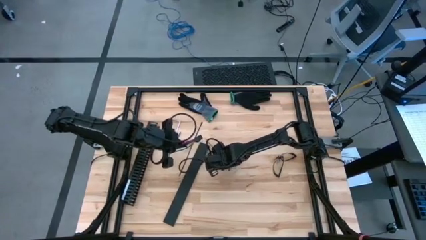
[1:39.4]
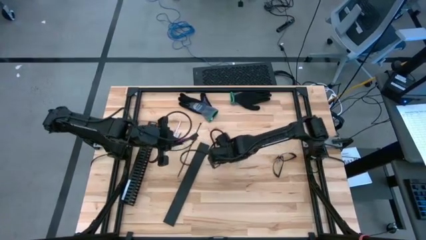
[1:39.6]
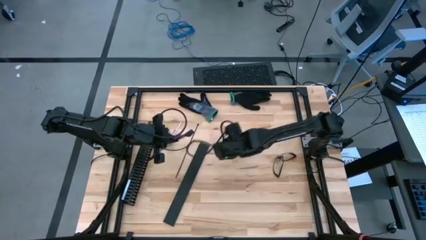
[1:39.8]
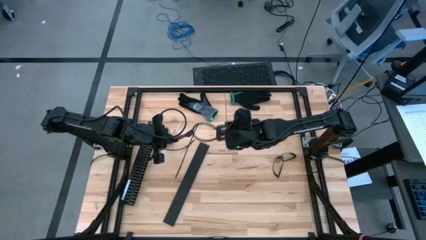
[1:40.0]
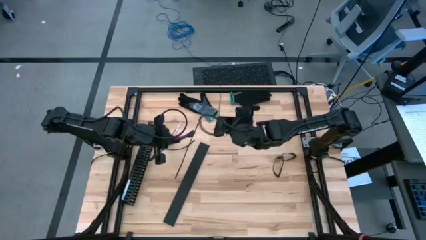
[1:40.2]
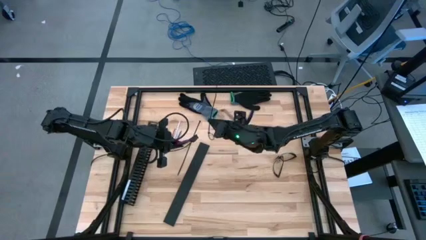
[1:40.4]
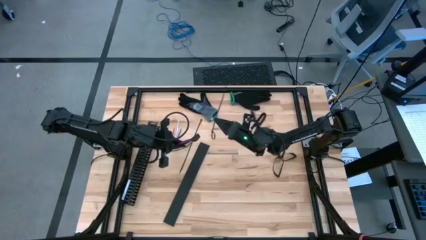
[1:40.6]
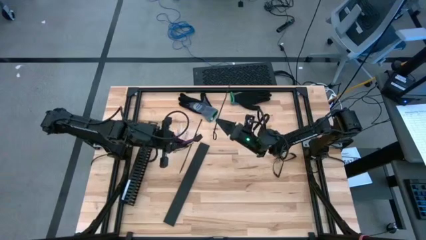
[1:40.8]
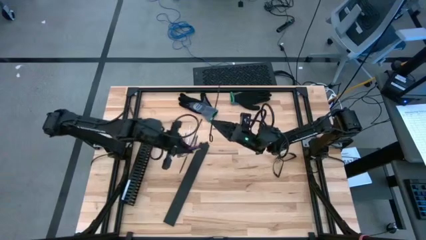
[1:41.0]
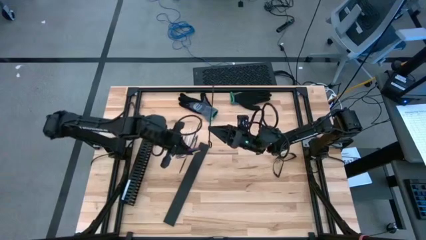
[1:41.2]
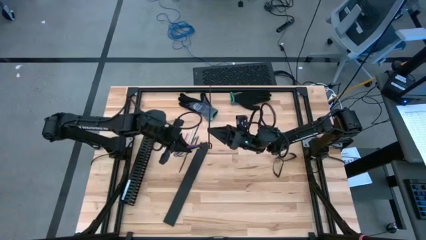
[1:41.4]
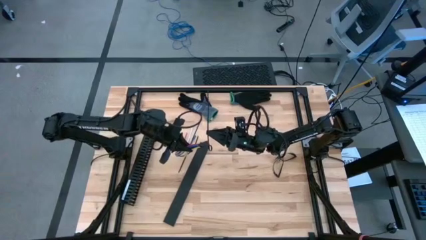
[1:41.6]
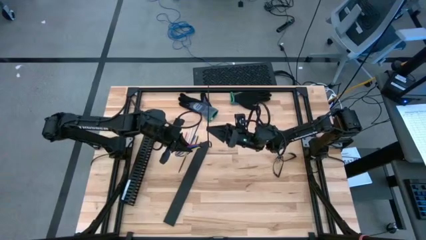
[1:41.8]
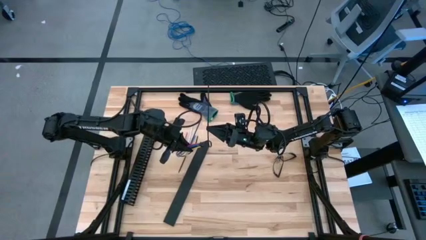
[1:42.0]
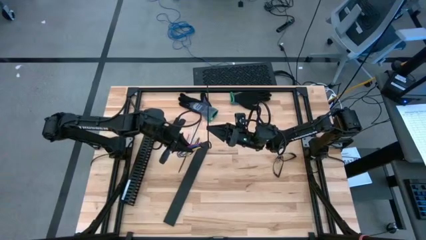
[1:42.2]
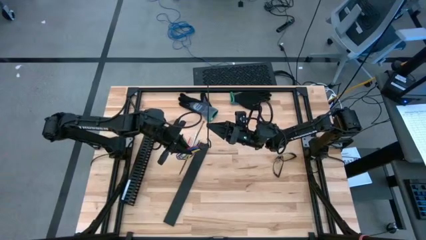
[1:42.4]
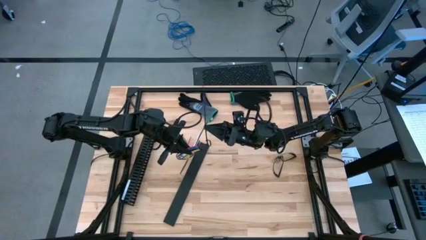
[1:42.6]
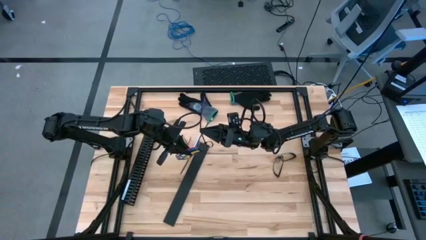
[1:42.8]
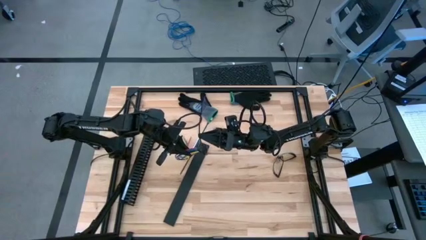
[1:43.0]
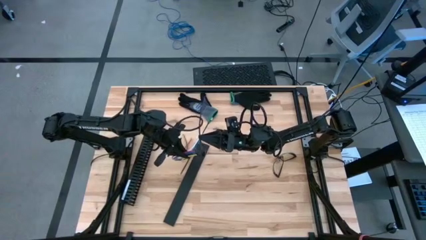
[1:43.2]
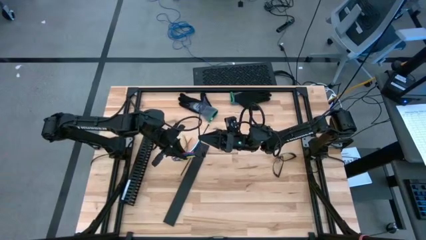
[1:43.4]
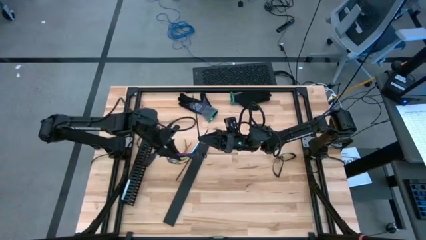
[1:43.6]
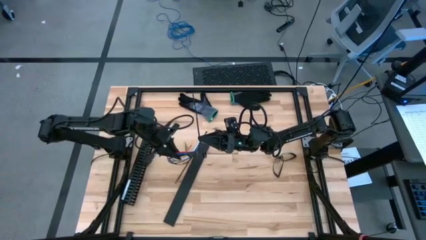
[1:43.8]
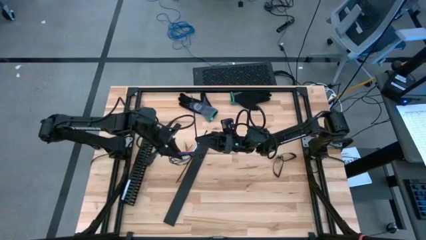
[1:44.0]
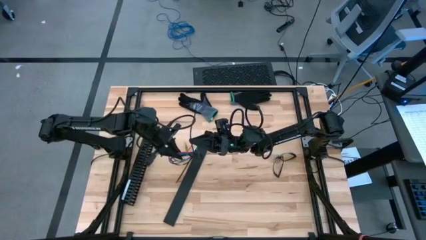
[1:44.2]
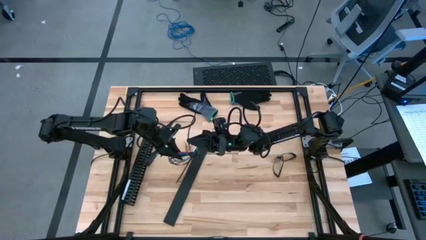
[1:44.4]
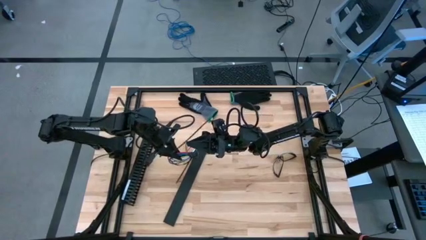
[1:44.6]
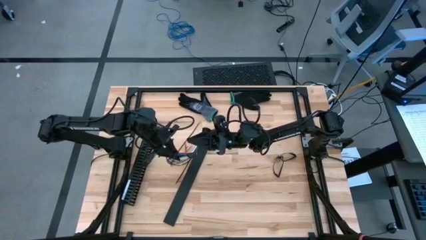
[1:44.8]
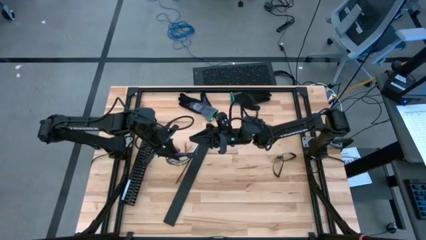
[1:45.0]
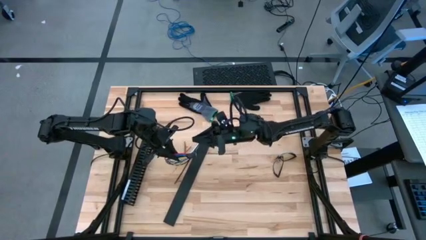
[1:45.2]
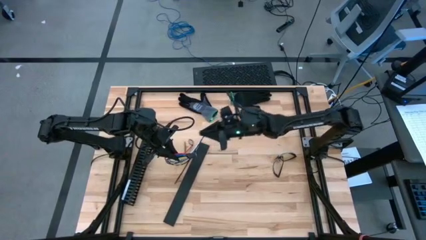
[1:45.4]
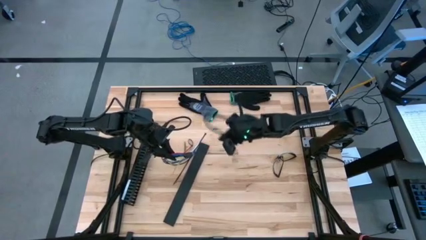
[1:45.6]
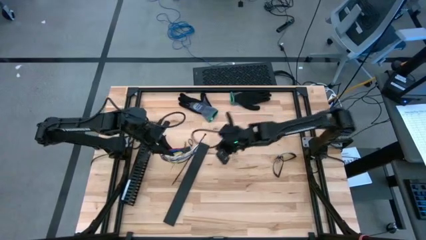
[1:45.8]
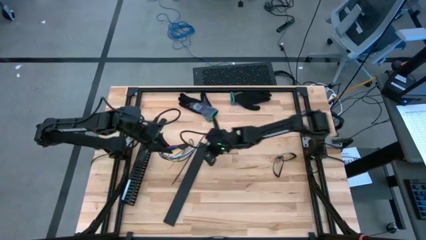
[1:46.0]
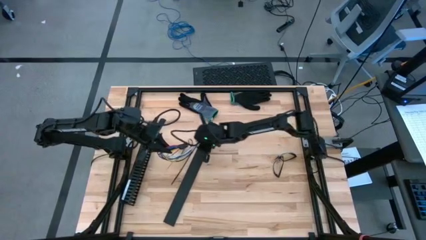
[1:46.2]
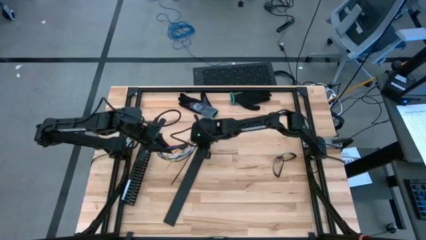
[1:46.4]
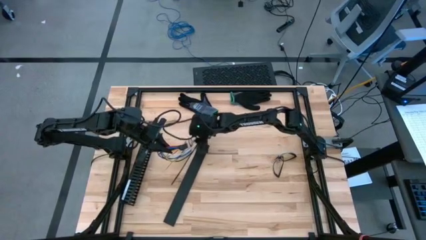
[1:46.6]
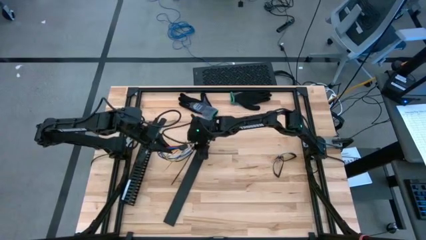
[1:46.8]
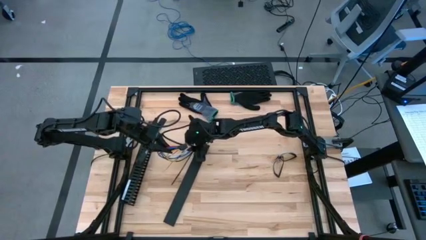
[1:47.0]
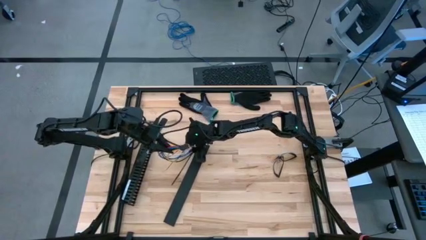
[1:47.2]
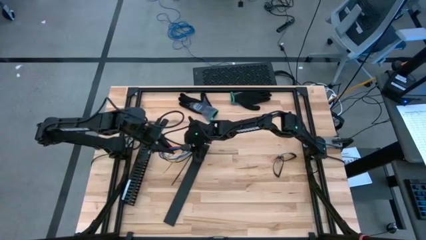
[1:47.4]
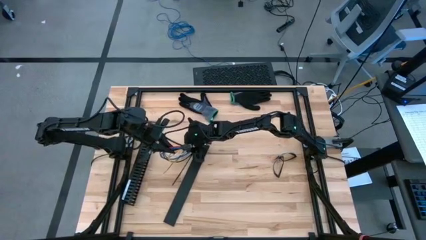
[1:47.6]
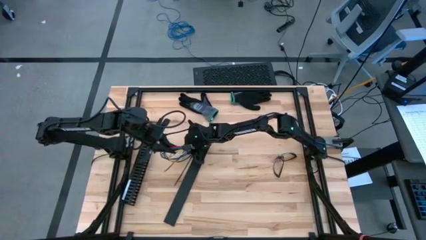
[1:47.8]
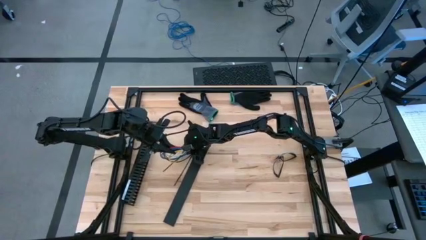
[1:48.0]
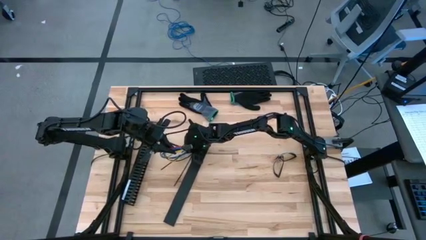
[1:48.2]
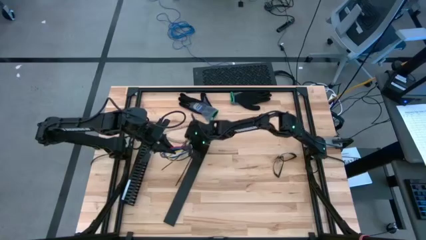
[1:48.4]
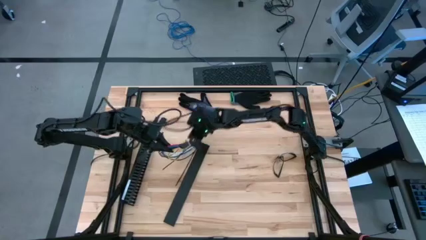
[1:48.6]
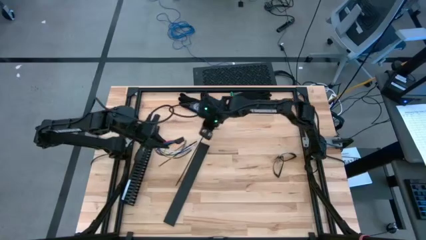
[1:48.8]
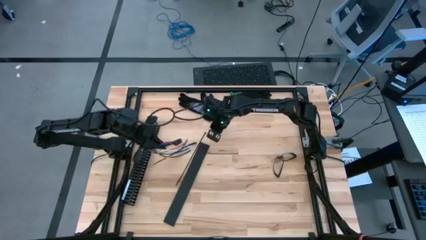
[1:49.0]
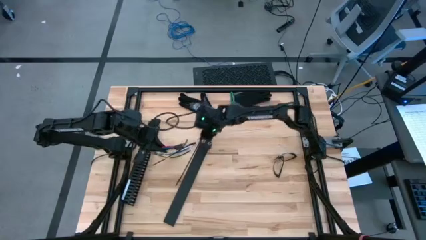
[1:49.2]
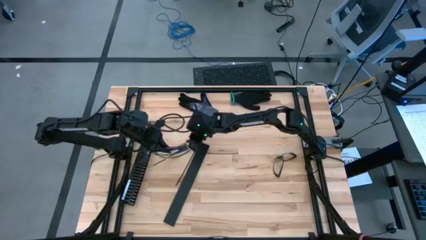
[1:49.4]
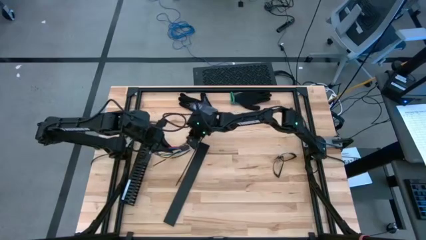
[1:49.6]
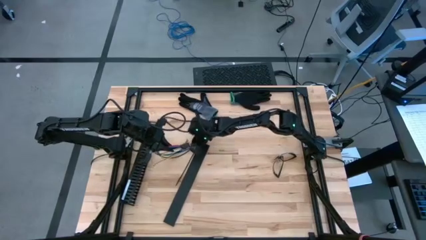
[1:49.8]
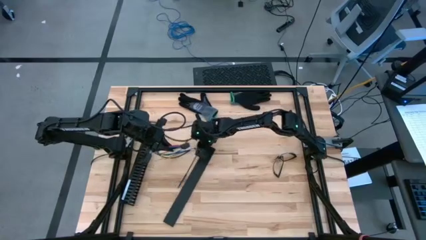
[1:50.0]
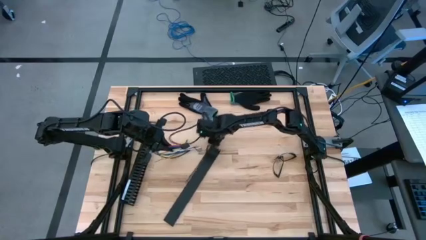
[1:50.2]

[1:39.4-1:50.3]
Task: Ziptie cables
Insert the cable wire into the black zip tie
